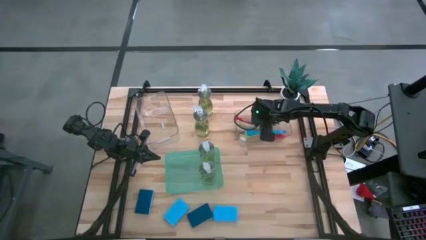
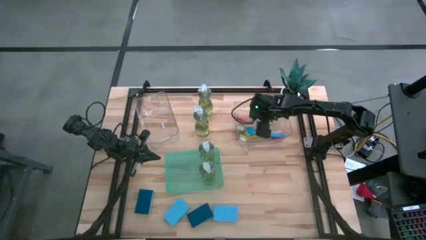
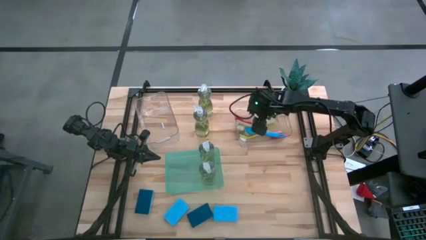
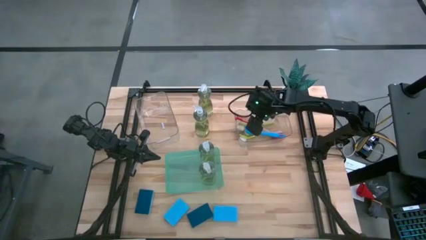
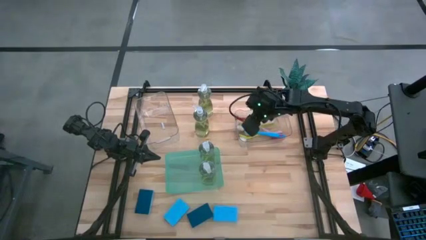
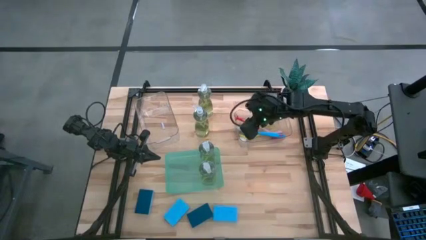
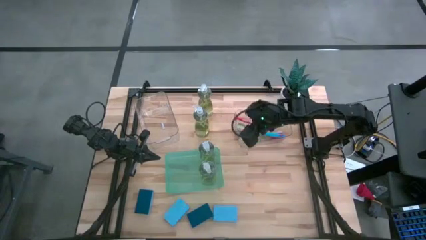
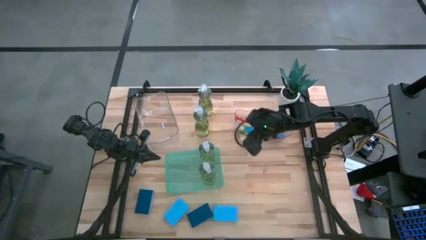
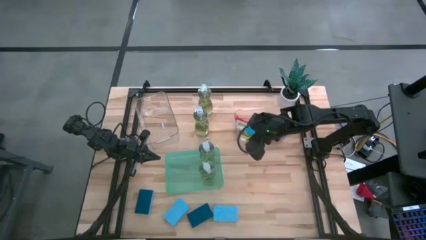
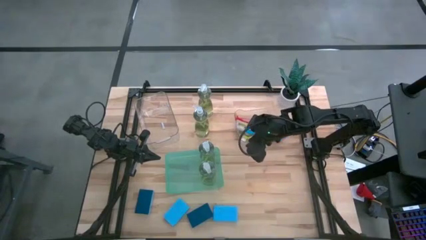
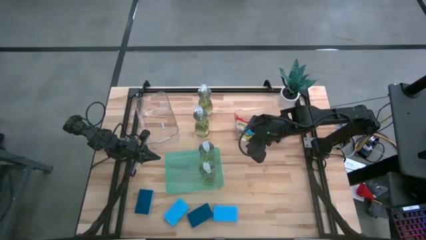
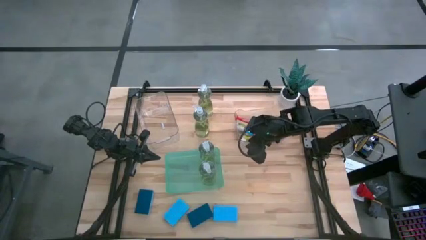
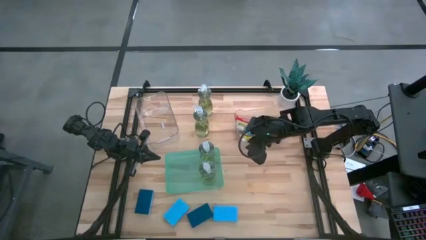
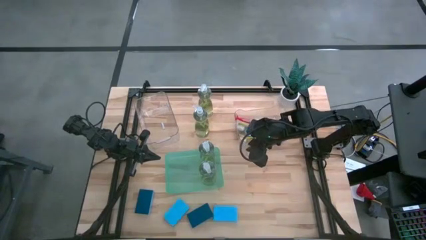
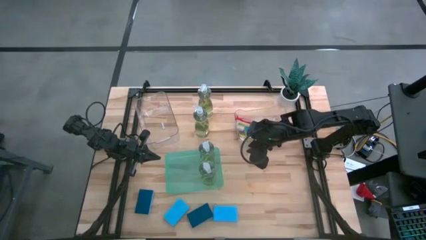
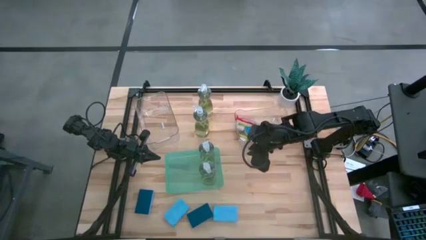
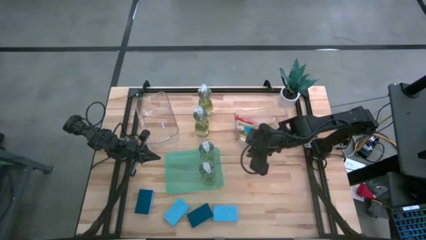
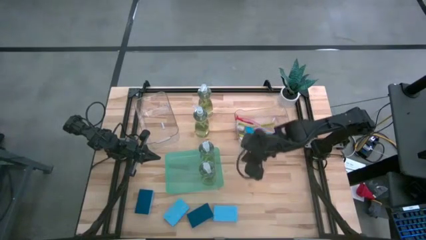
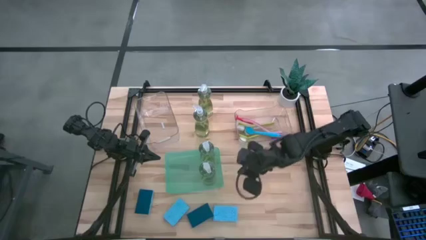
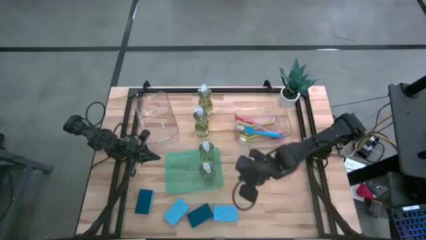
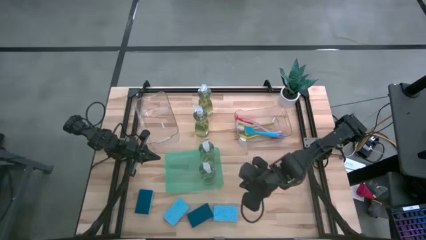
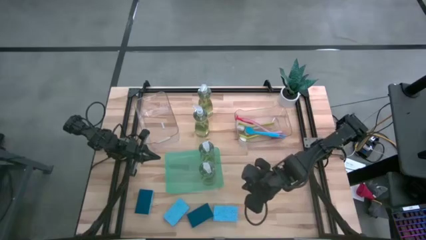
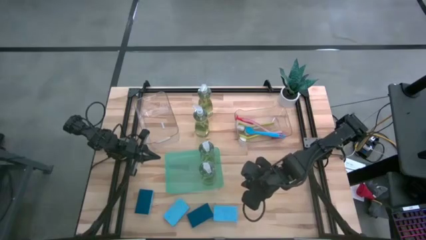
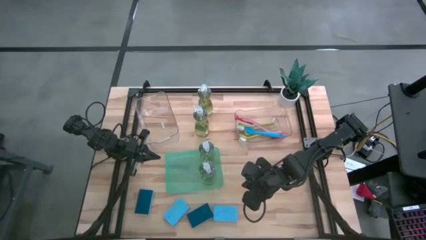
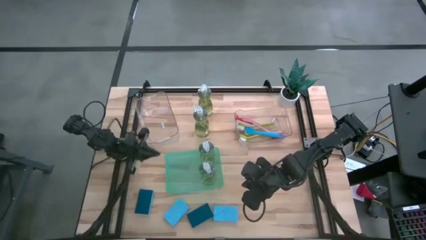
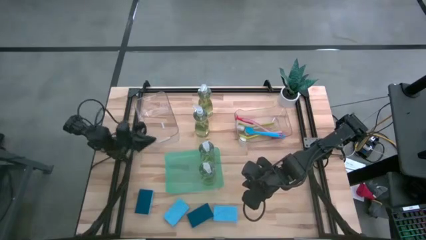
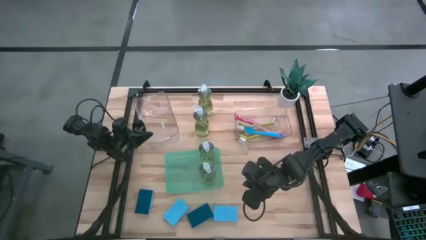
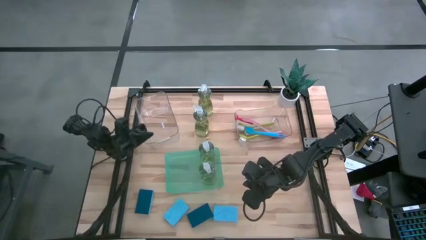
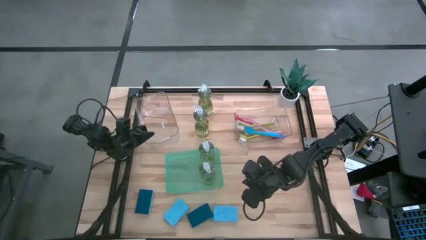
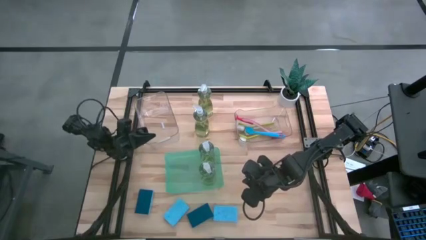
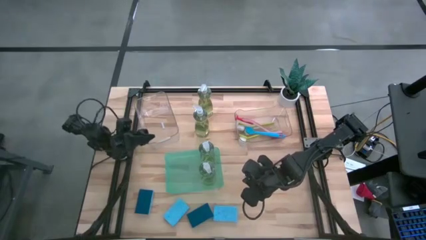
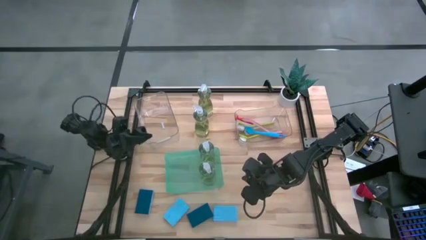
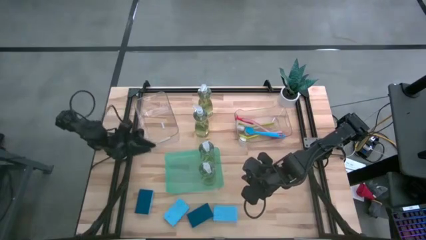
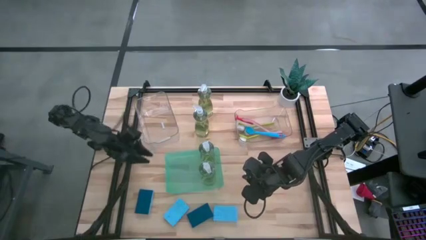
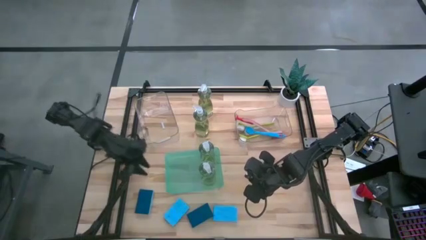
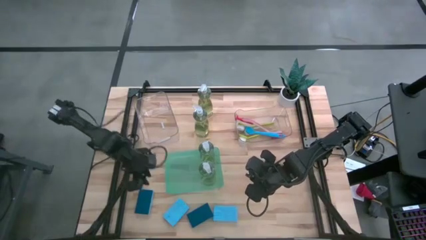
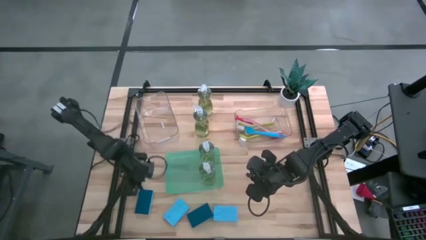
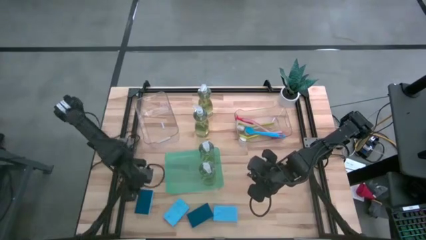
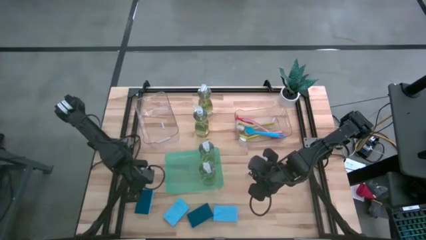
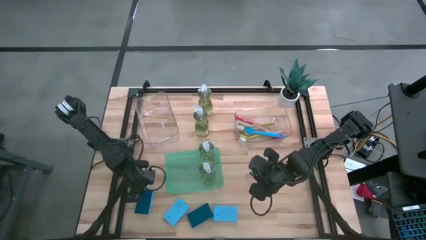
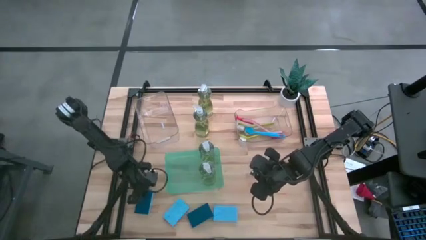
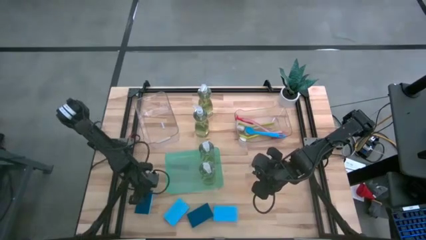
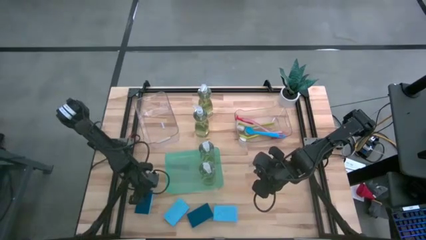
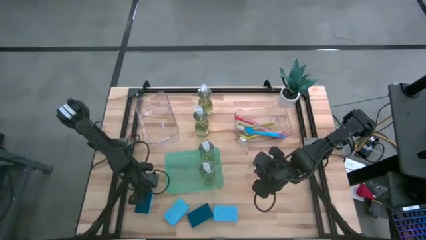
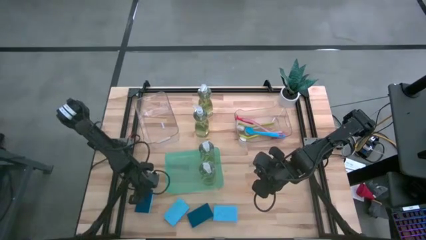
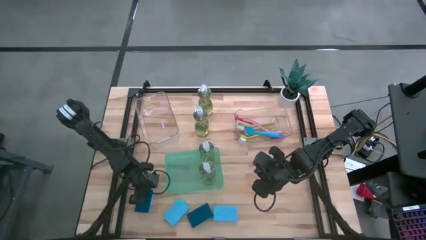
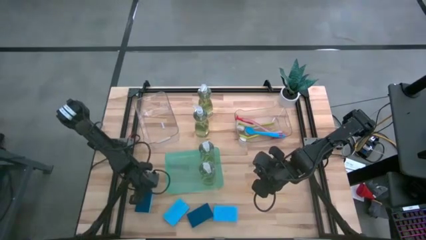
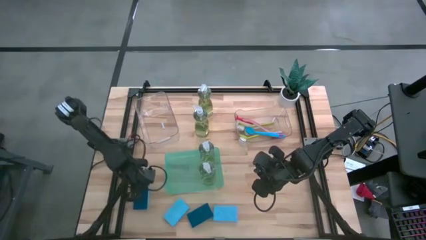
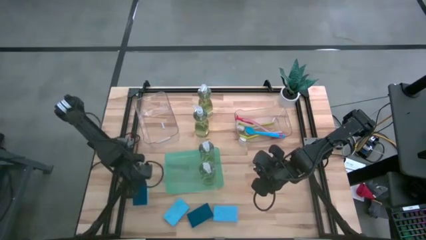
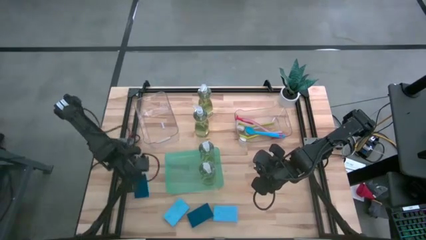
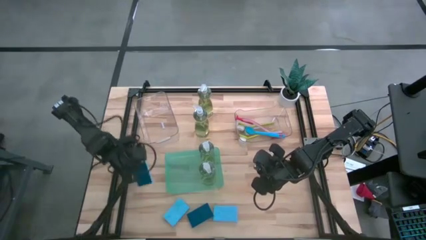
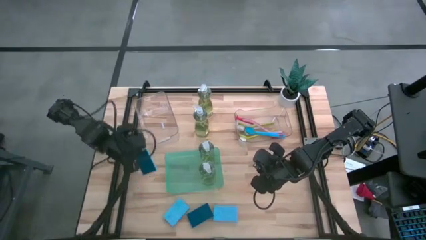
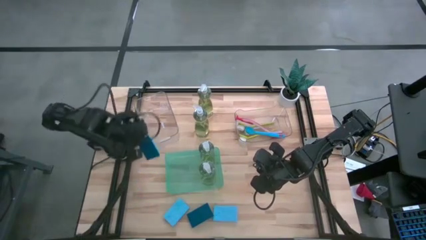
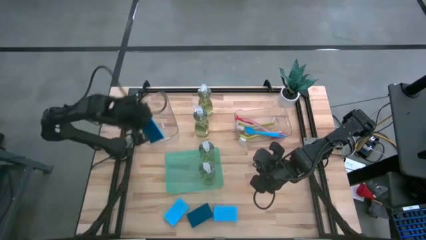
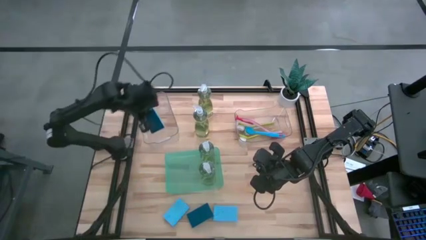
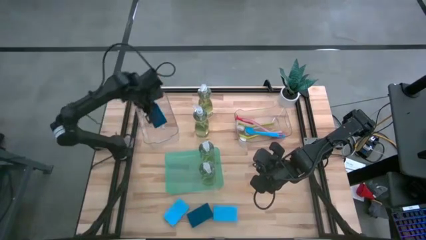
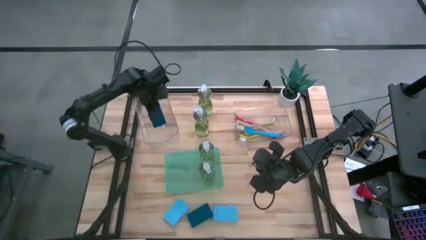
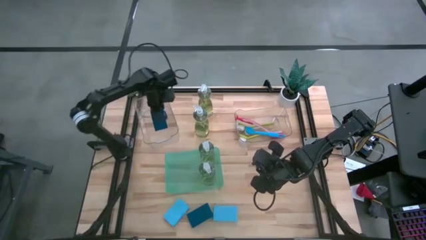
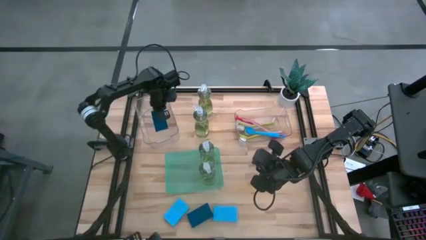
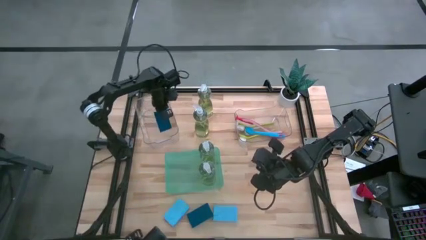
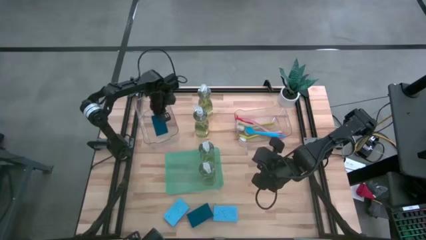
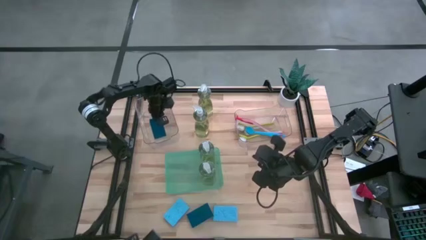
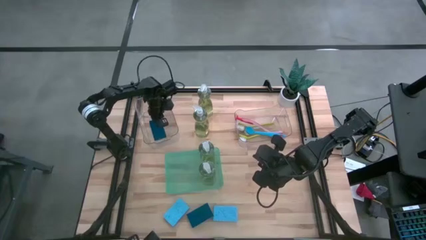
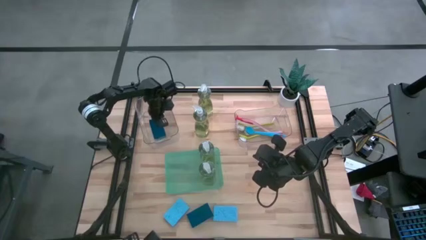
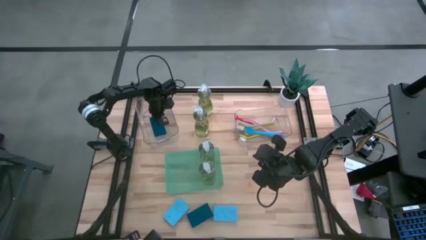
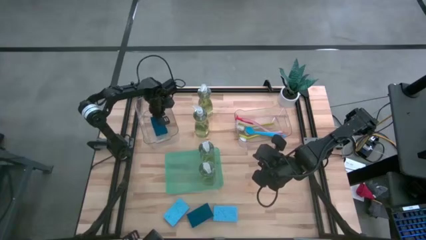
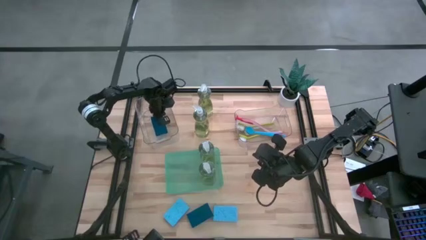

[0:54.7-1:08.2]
Task: Pick & Place Kitchen Sink Supplies
Put the blue sponge into the left transparent bin

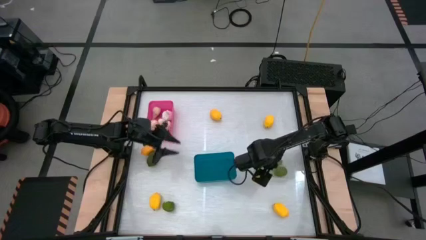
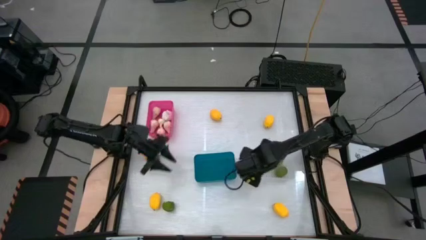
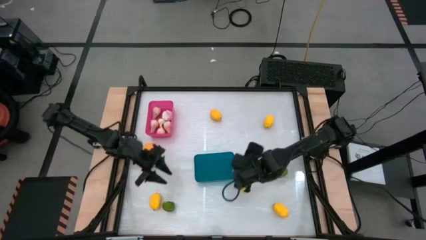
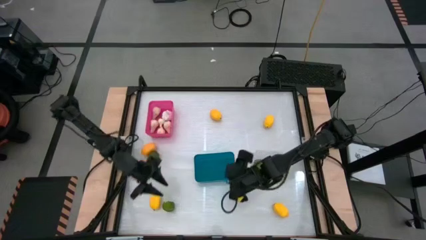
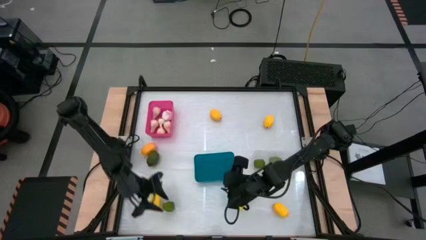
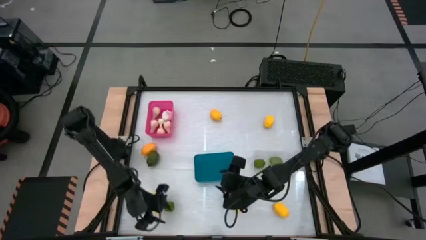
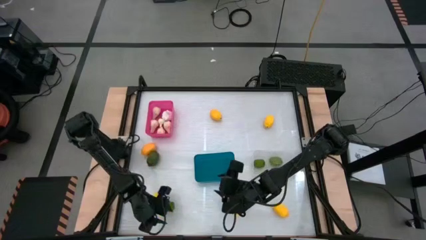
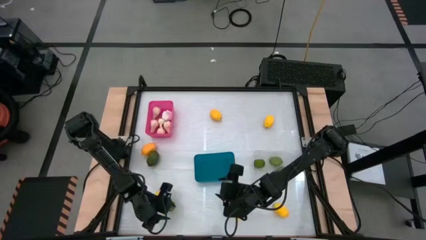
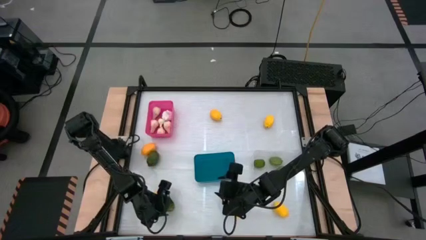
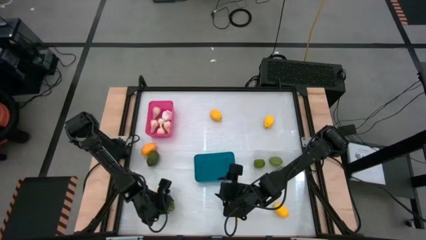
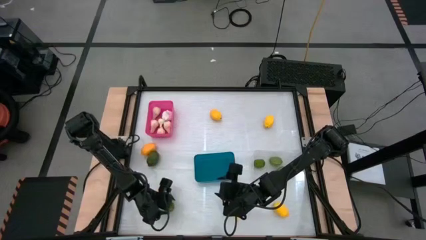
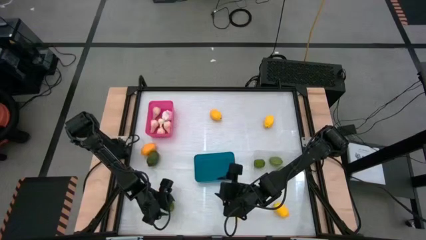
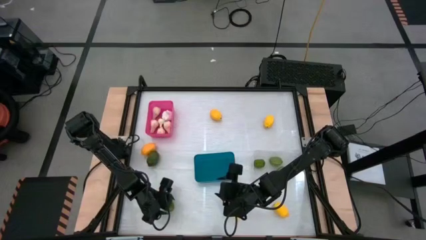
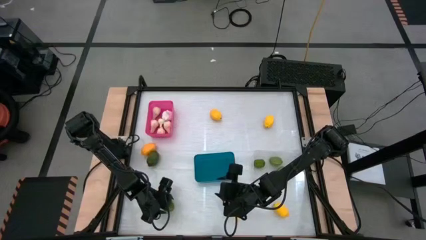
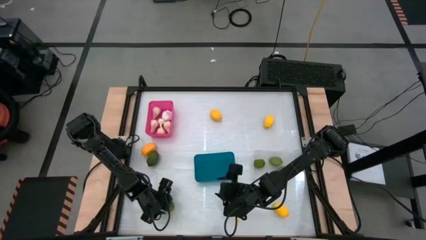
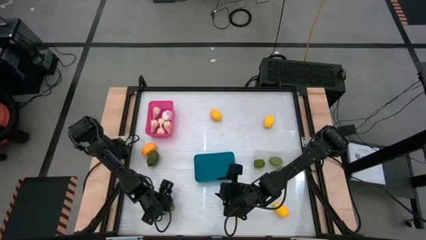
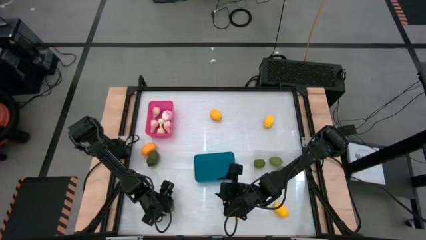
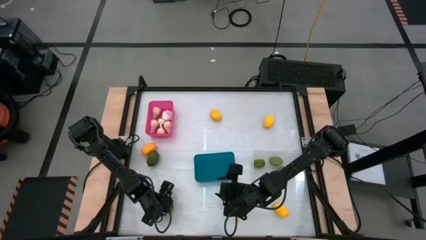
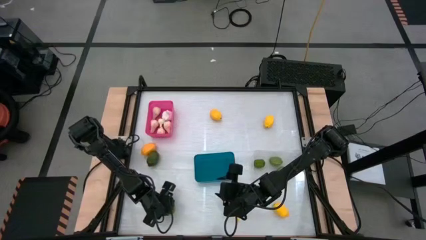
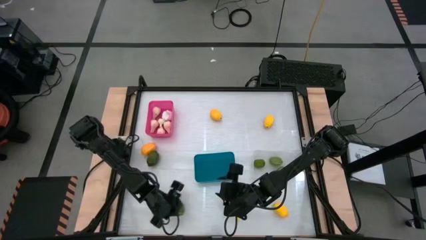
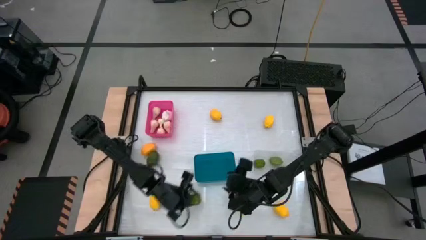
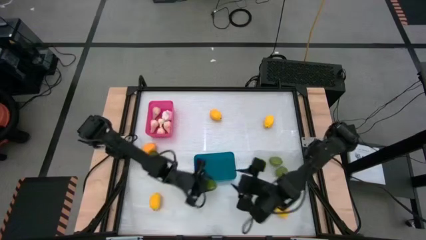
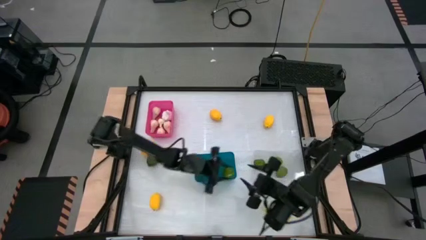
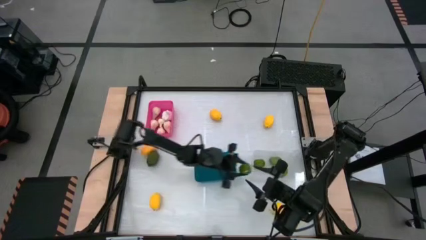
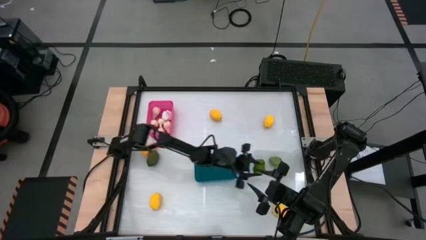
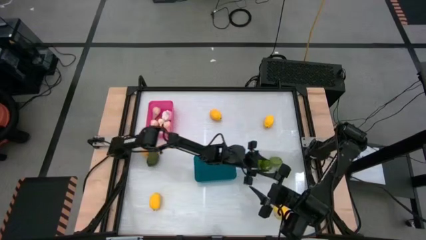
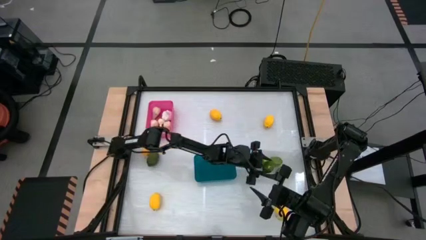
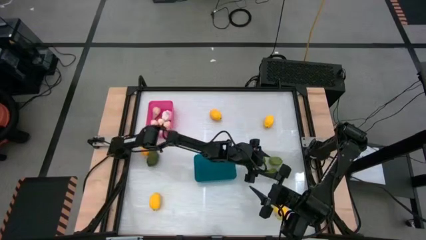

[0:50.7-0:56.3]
Task: Sort produce into baskets
Put the green lime into the white bin
